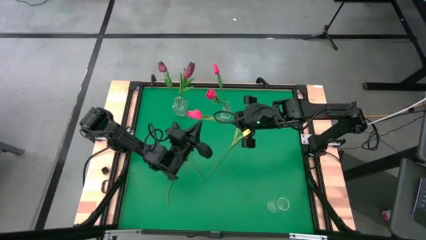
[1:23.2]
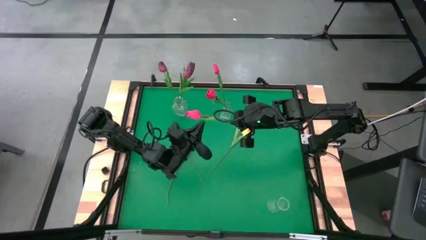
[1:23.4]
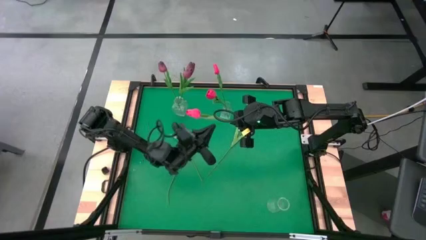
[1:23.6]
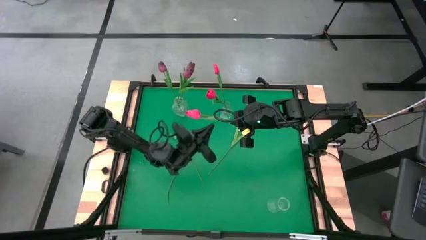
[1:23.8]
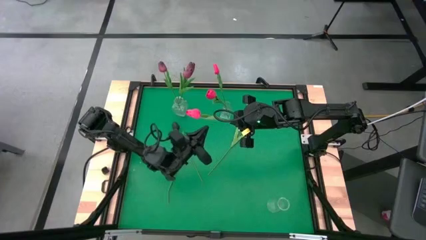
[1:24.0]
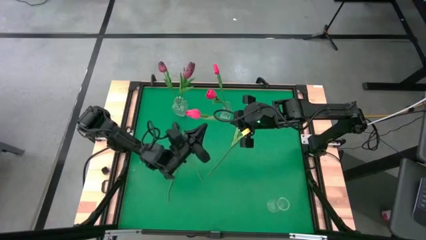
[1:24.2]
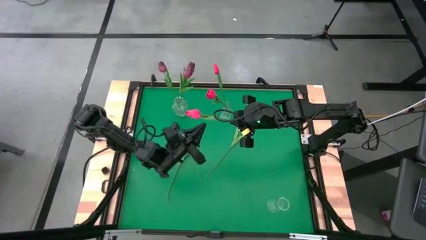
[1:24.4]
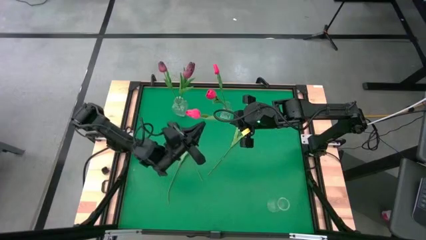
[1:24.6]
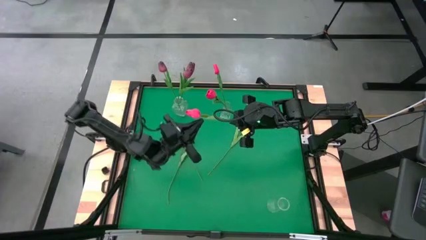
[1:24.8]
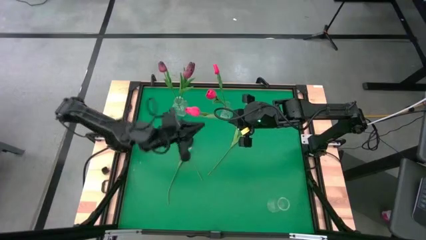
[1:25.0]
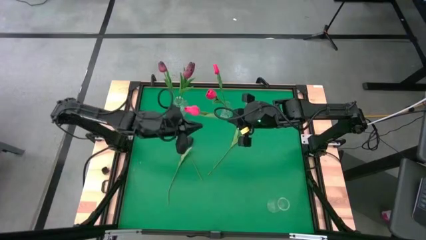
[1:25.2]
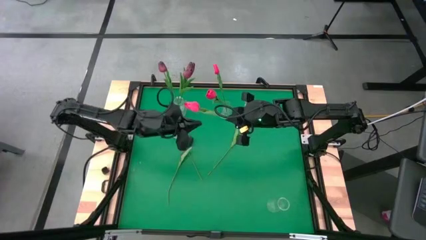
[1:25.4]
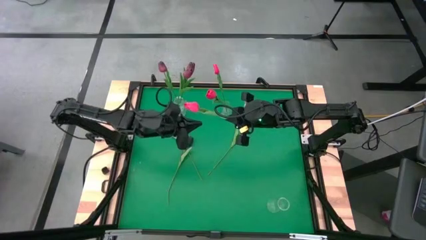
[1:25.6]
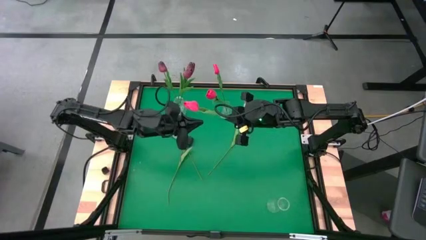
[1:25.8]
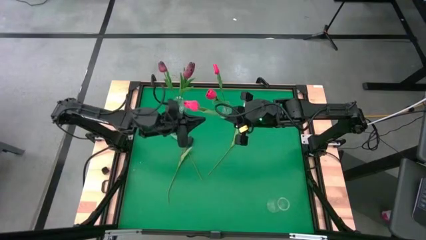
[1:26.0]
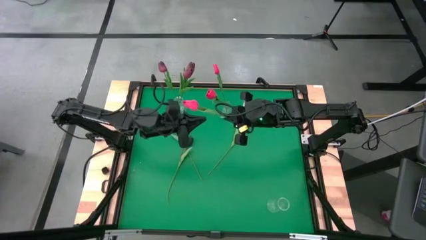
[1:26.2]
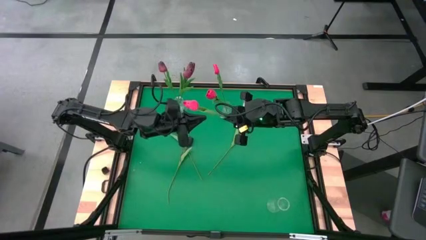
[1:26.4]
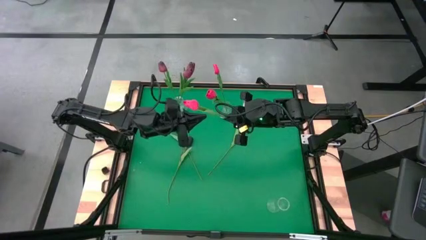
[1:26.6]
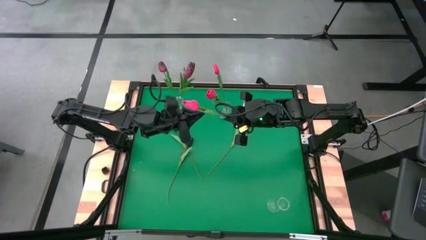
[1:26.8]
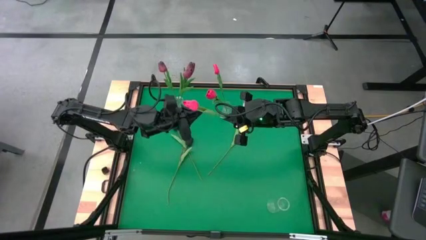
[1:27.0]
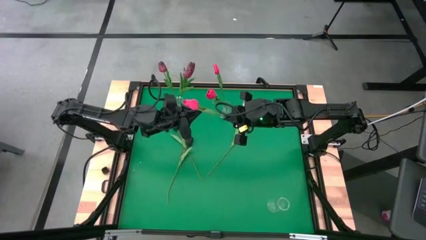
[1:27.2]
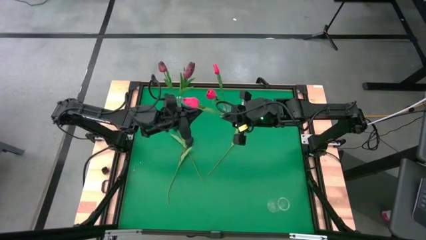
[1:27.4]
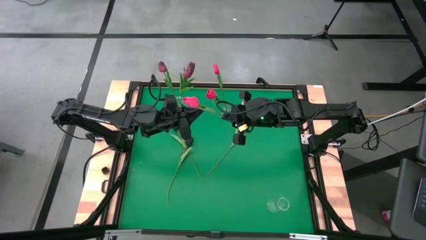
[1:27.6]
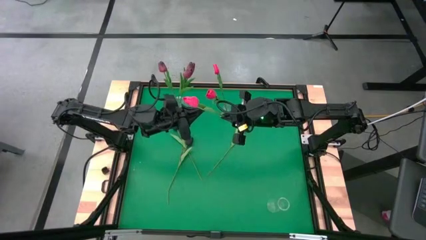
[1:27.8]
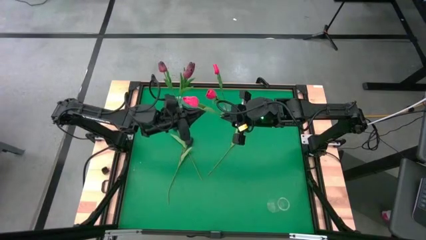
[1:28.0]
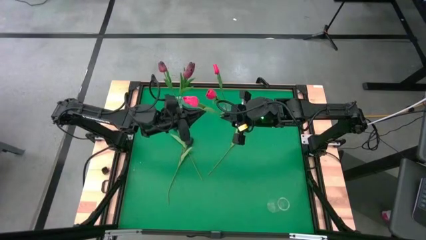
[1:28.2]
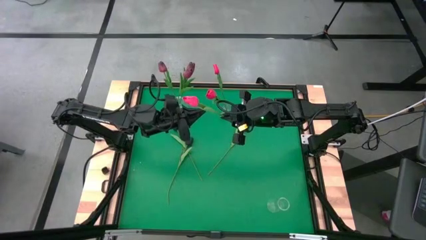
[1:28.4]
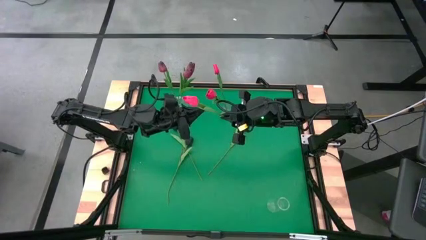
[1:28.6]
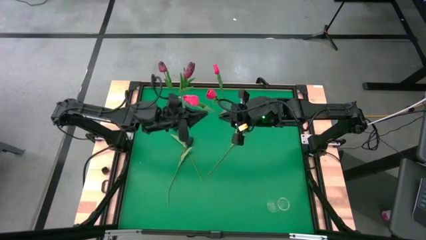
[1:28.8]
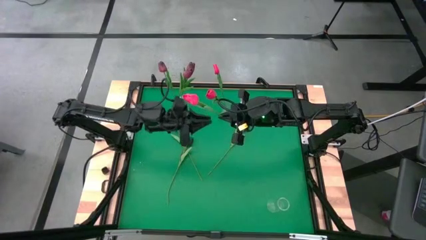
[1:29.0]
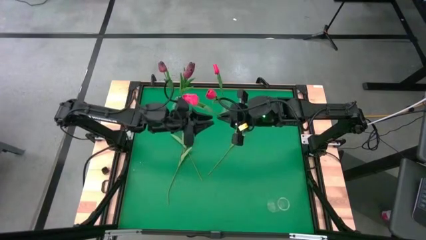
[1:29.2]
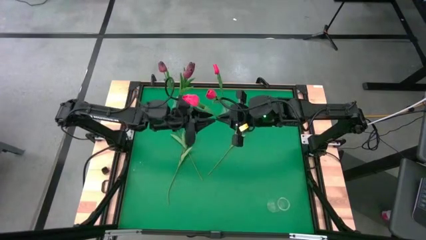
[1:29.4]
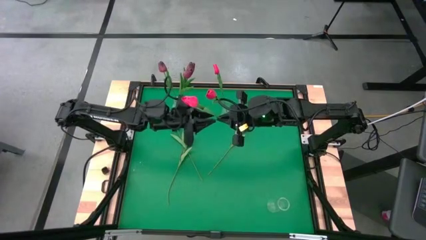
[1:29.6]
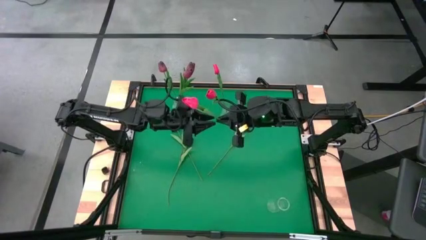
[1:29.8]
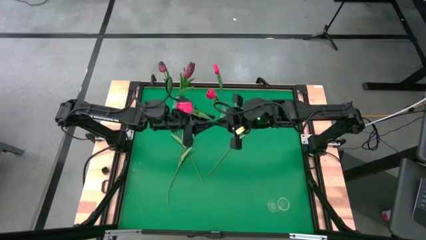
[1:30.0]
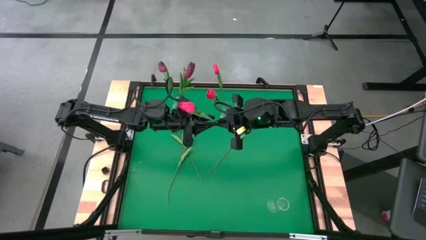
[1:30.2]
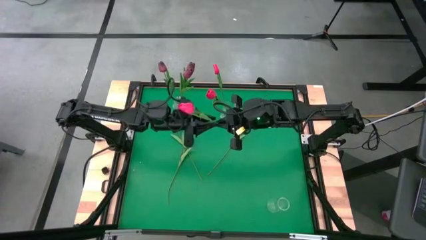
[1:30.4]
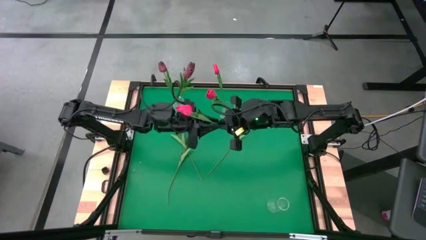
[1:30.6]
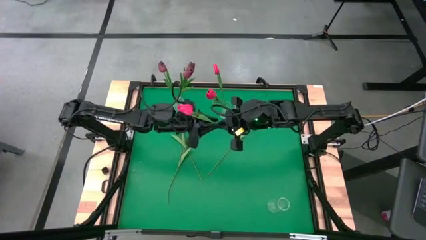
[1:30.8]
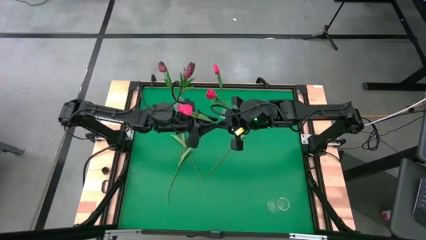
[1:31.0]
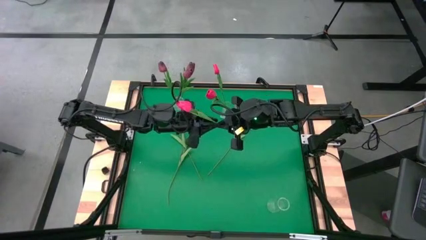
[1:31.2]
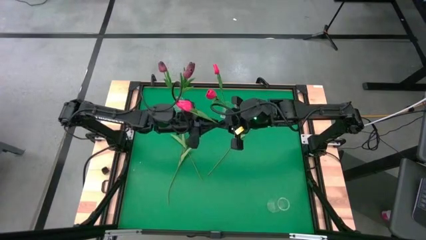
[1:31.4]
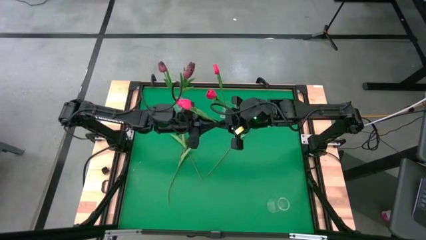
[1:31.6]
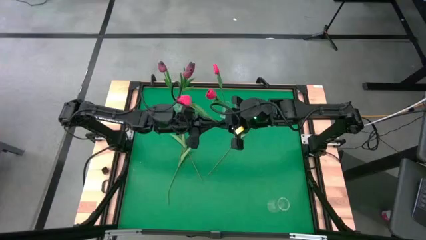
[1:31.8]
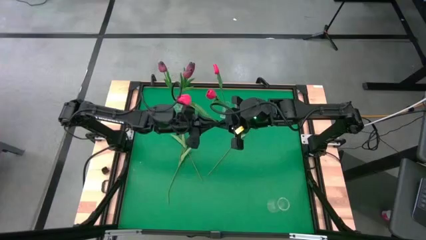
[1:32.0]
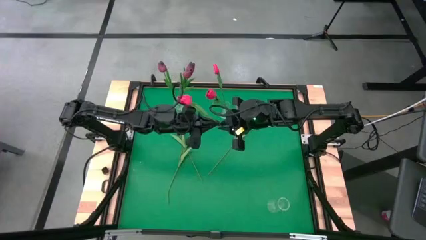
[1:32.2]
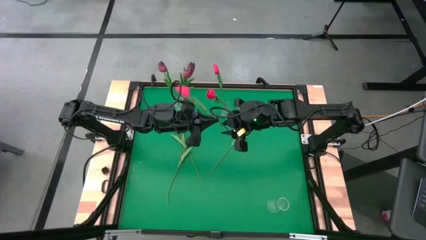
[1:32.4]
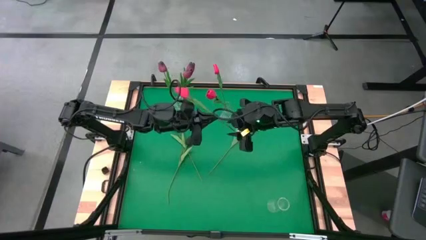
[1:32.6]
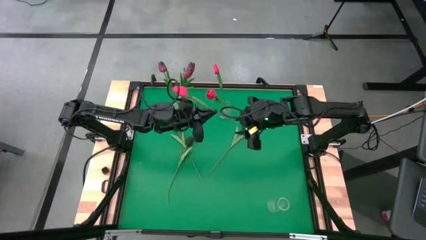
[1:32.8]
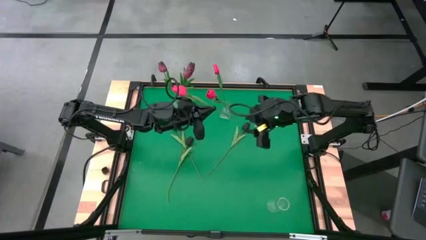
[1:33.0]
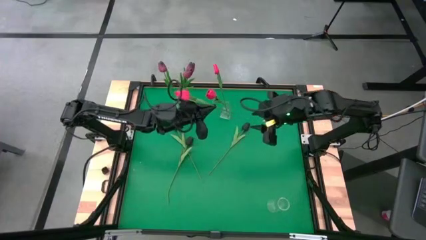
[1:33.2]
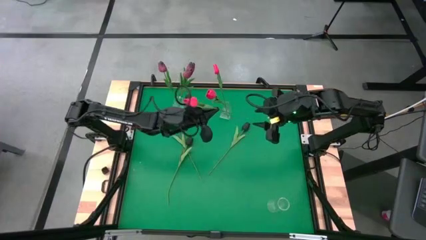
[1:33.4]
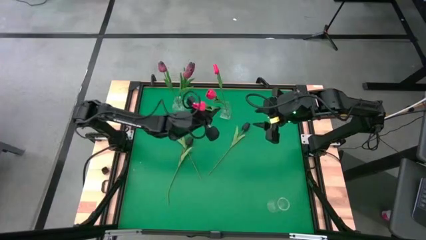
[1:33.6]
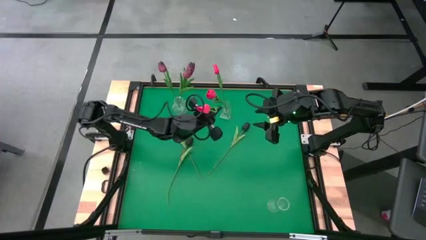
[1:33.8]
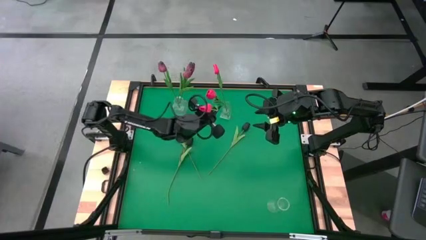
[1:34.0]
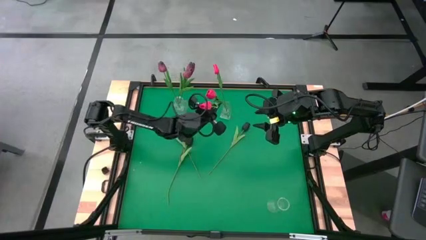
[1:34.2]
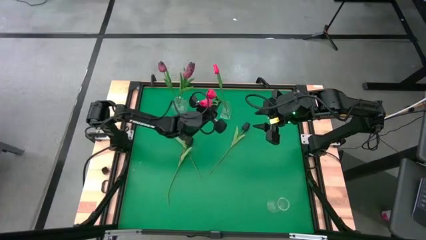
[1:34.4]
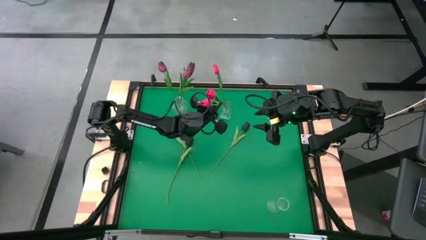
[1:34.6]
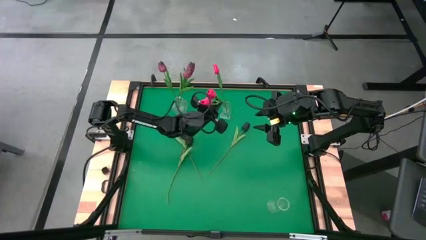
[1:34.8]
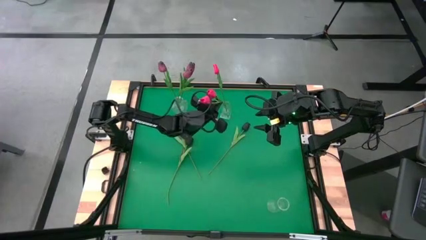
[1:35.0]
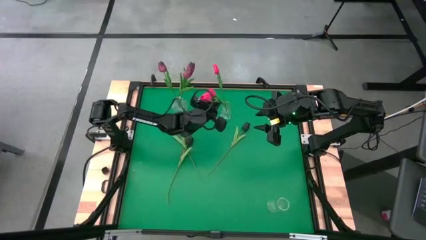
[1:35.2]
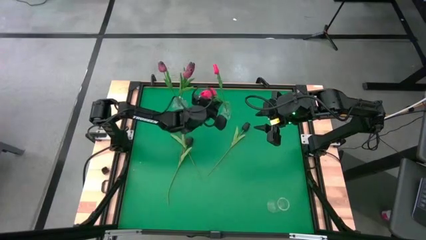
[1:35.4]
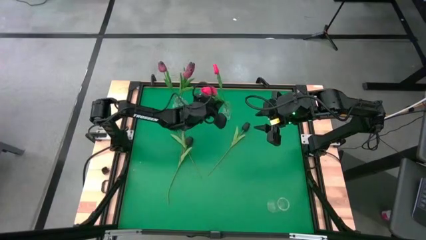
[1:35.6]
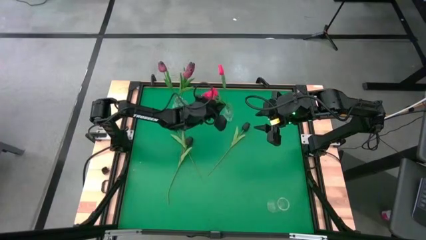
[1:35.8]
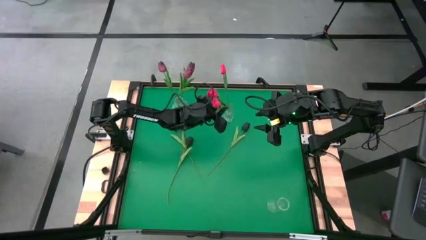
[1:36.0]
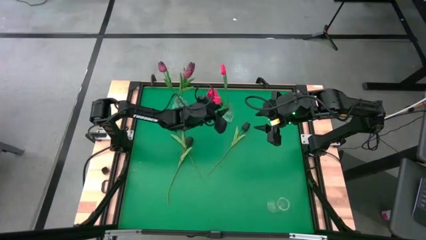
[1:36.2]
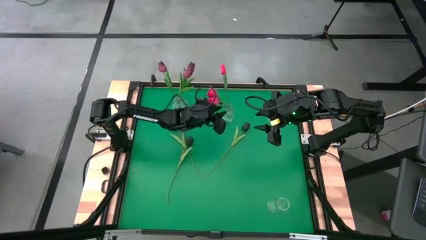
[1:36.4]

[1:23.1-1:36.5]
Task: Sort flowers into vase by color
Put the red tulip into the top right transparent vase

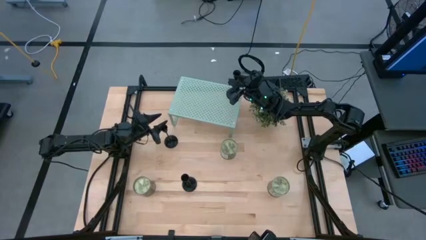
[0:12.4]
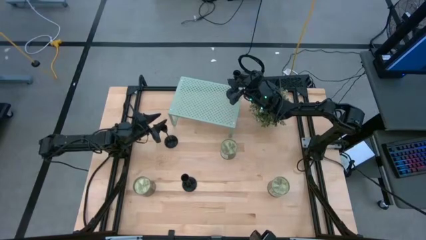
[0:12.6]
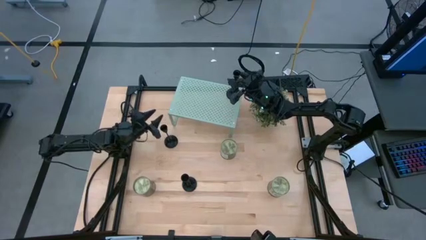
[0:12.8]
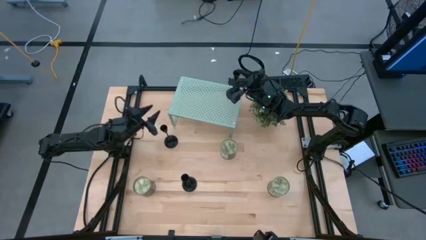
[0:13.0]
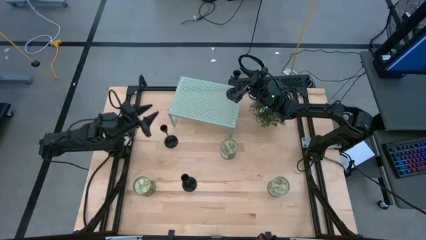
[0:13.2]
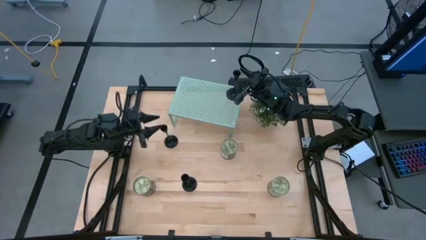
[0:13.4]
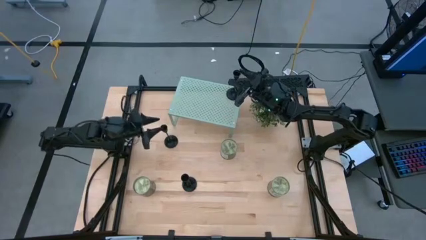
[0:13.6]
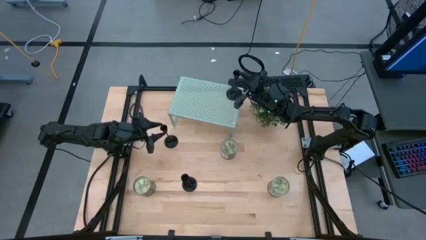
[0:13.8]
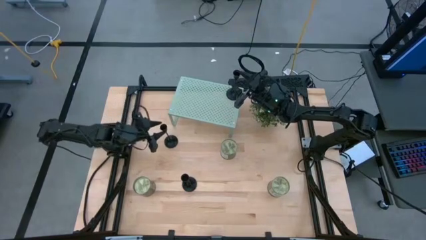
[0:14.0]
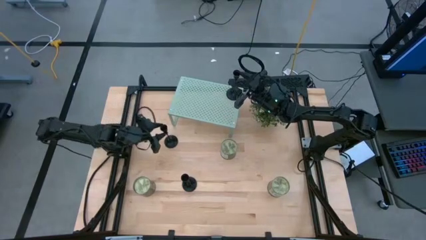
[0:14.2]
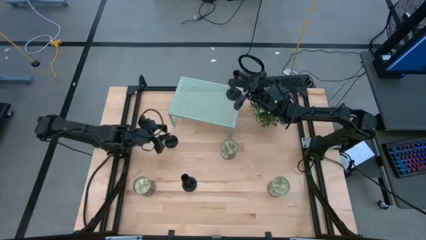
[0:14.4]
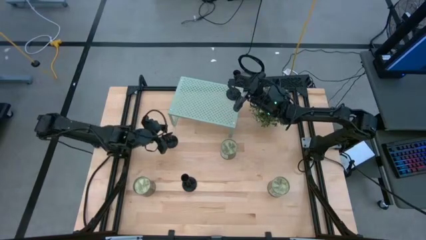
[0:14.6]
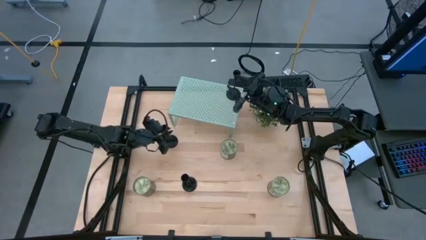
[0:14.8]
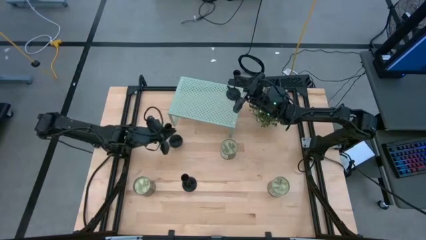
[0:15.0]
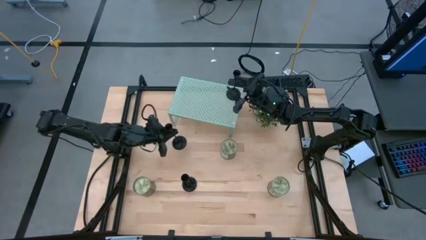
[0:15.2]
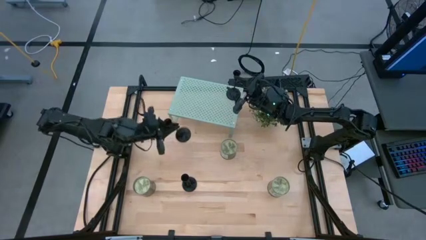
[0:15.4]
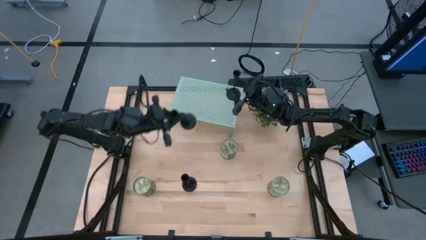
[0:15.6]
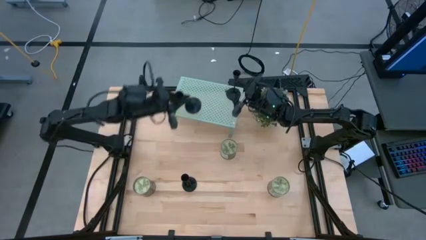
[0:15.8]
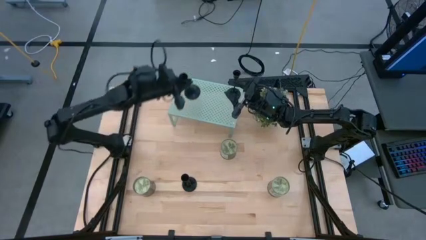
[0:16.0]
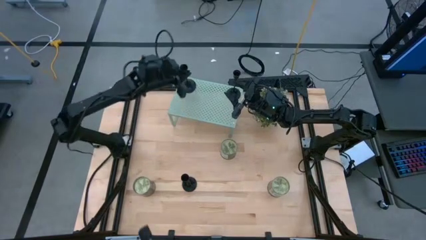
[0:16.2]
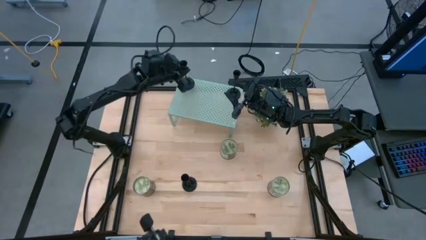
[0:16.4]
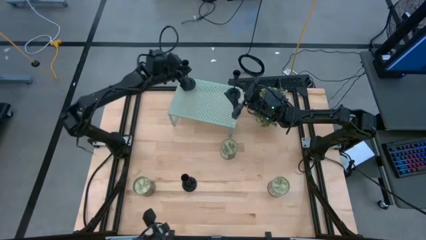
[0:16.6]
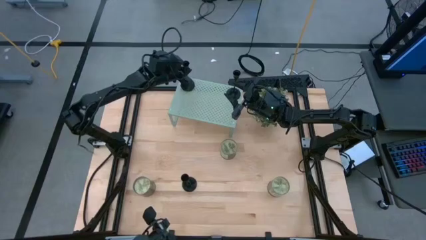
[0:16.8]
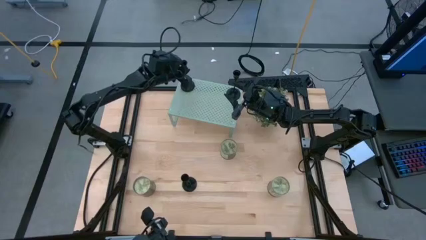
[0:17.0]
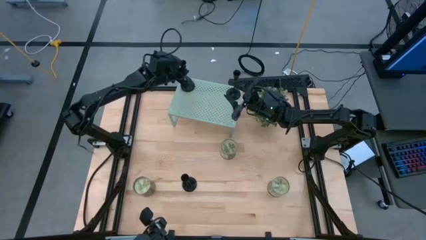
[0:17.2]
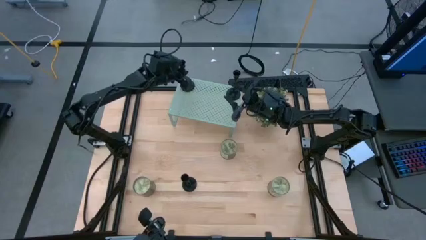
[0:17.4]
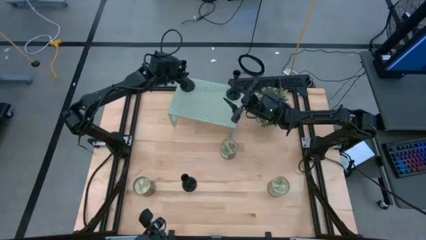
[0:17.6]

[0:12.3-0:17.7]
Task: Pick & Place candle stick holders
Put the top black candle holder on the shelf
